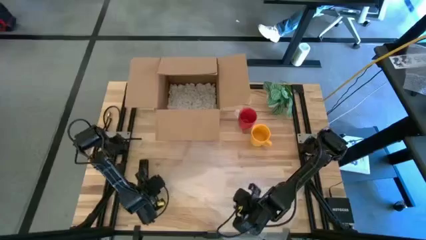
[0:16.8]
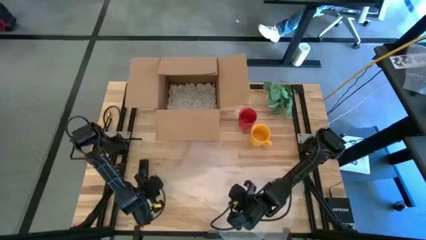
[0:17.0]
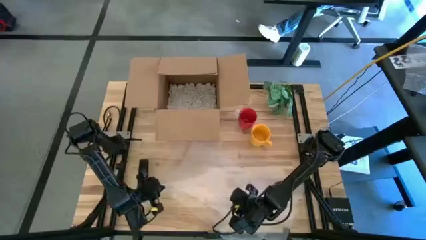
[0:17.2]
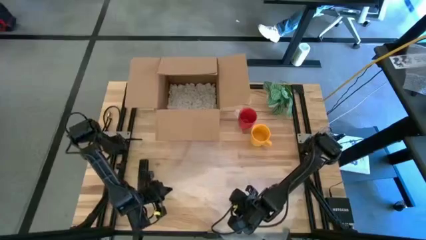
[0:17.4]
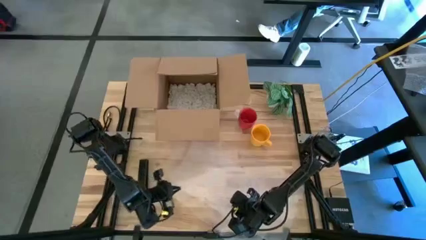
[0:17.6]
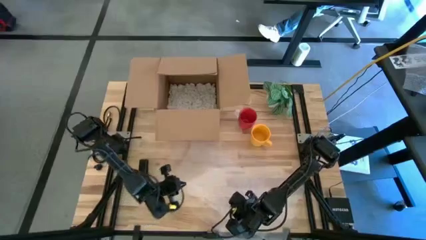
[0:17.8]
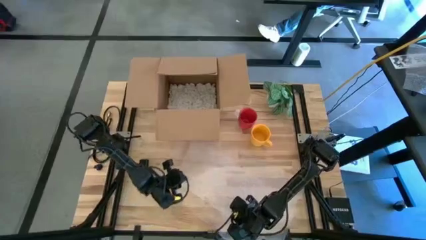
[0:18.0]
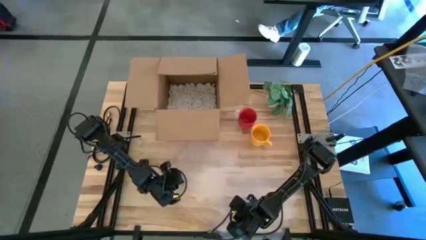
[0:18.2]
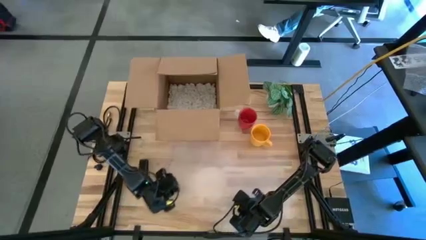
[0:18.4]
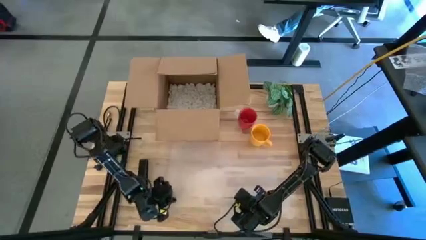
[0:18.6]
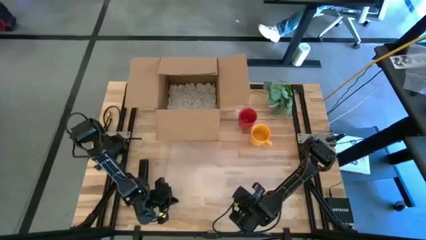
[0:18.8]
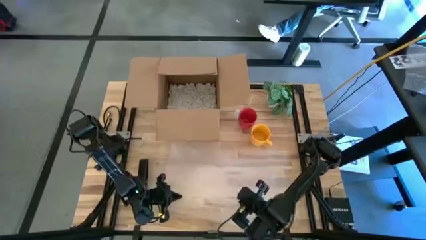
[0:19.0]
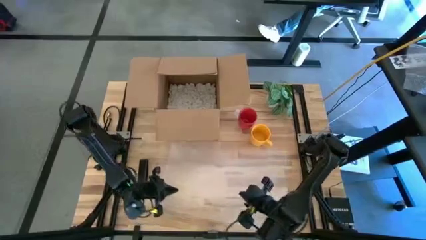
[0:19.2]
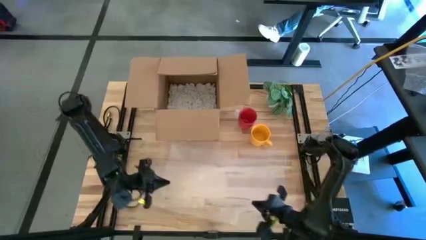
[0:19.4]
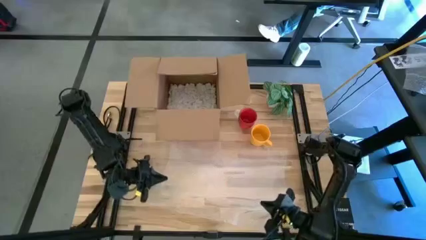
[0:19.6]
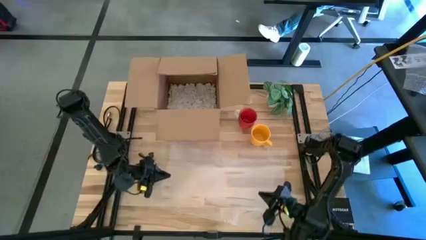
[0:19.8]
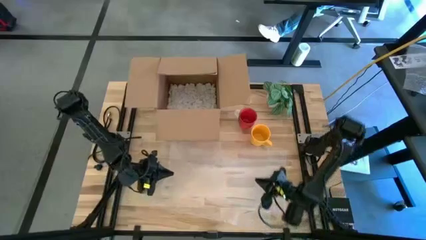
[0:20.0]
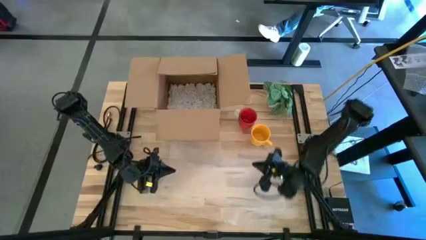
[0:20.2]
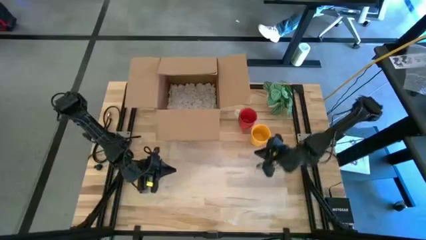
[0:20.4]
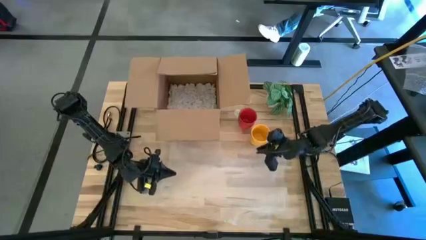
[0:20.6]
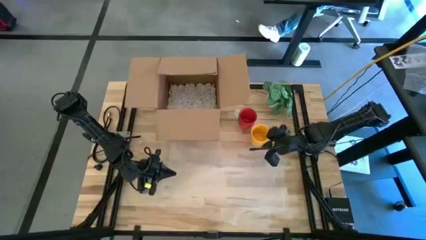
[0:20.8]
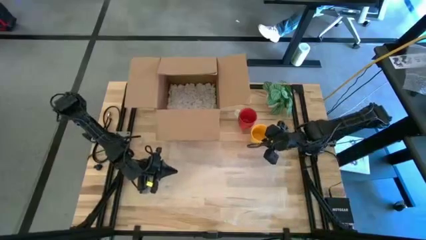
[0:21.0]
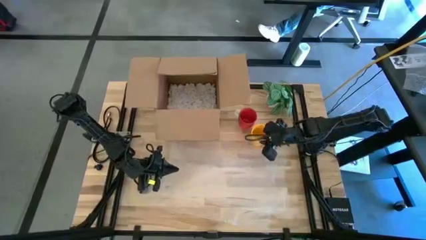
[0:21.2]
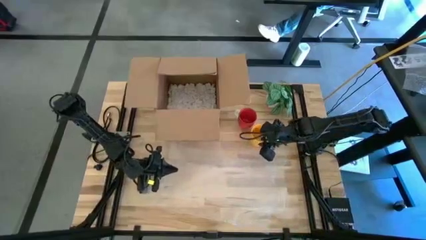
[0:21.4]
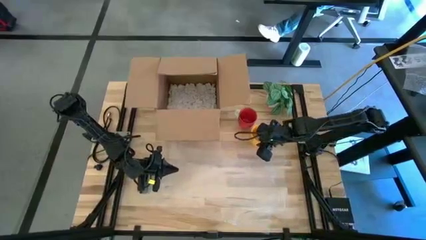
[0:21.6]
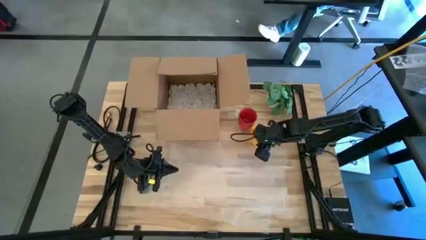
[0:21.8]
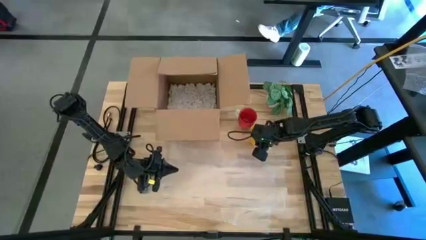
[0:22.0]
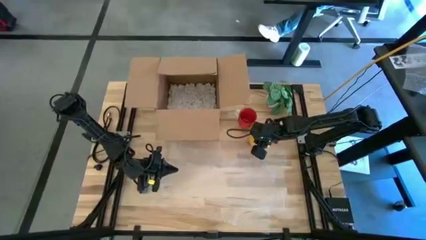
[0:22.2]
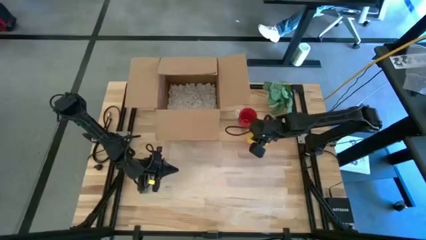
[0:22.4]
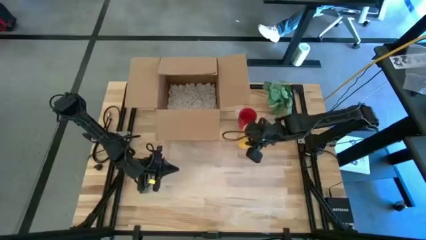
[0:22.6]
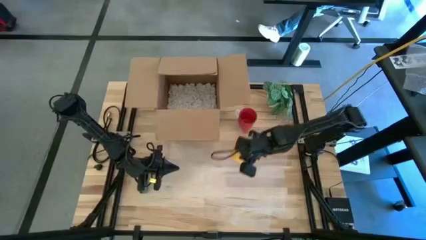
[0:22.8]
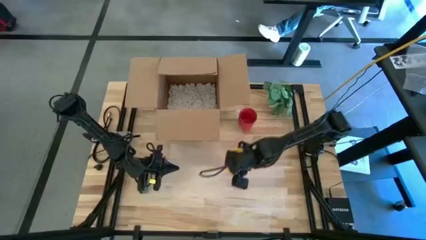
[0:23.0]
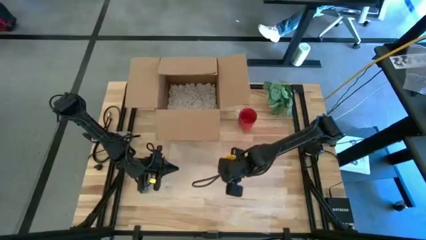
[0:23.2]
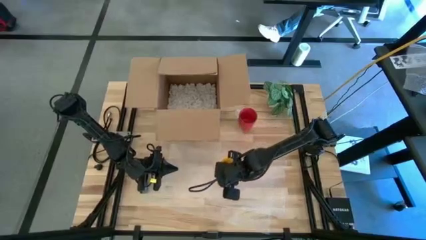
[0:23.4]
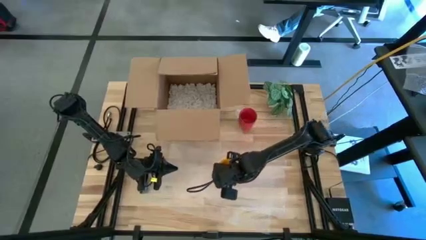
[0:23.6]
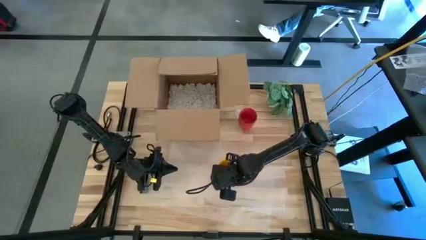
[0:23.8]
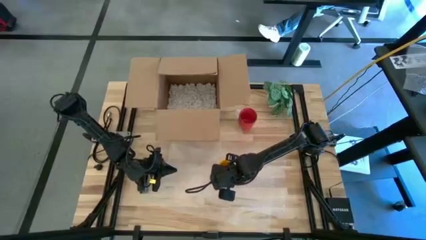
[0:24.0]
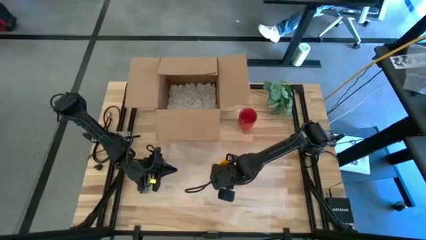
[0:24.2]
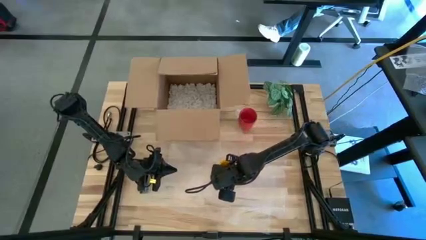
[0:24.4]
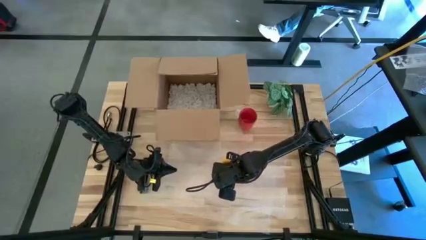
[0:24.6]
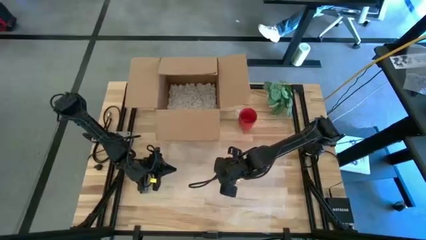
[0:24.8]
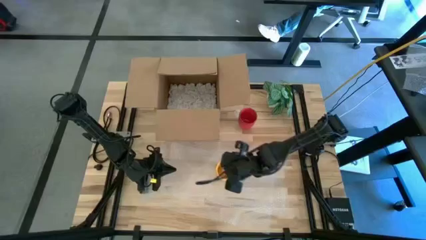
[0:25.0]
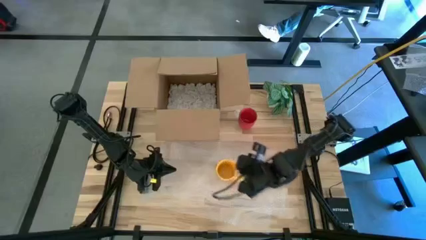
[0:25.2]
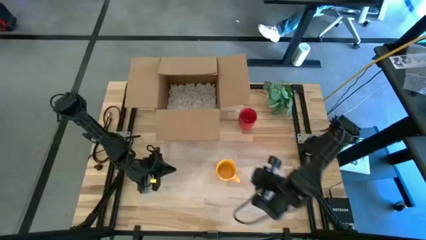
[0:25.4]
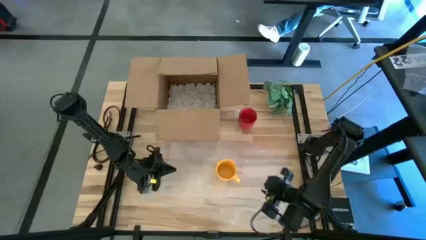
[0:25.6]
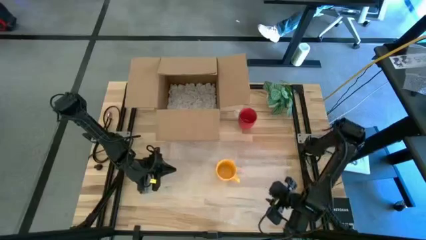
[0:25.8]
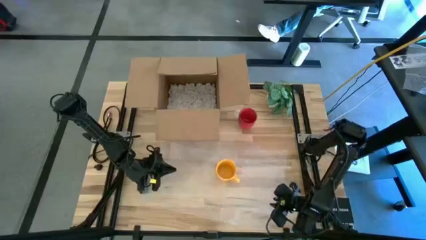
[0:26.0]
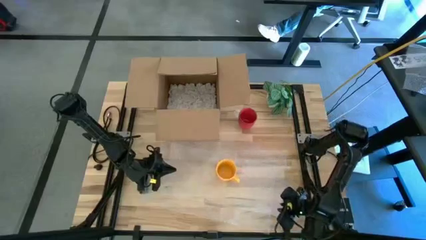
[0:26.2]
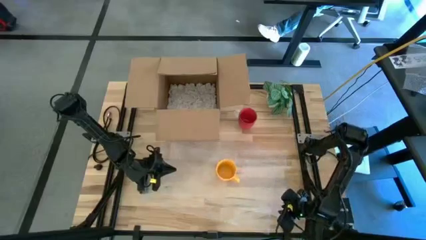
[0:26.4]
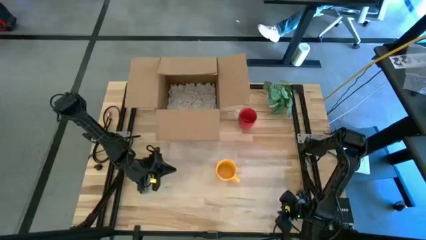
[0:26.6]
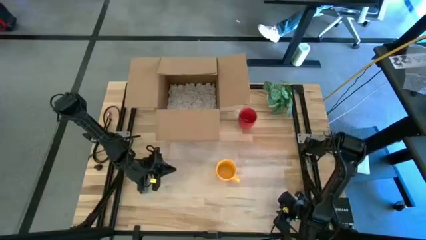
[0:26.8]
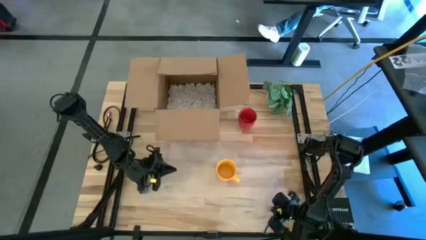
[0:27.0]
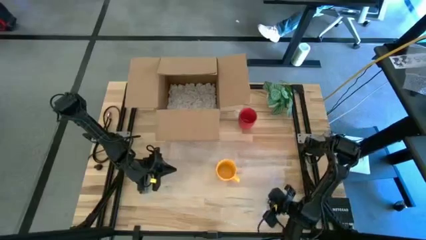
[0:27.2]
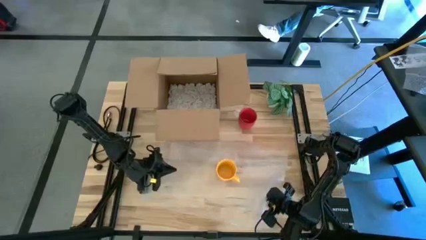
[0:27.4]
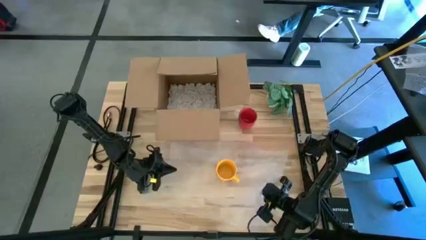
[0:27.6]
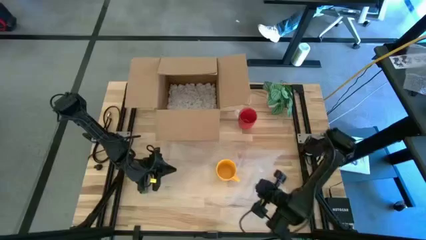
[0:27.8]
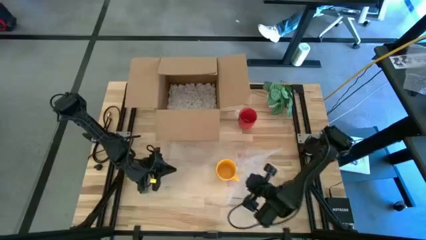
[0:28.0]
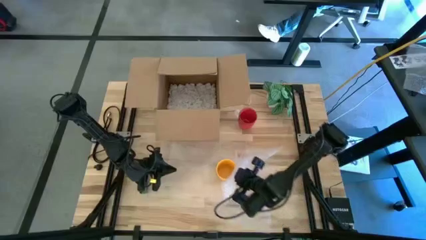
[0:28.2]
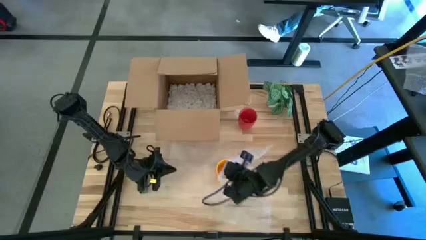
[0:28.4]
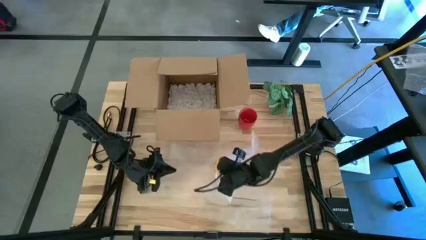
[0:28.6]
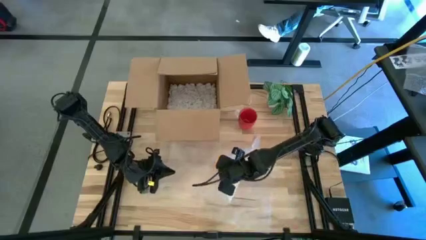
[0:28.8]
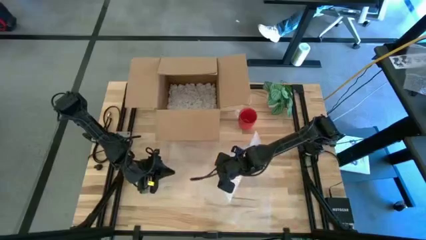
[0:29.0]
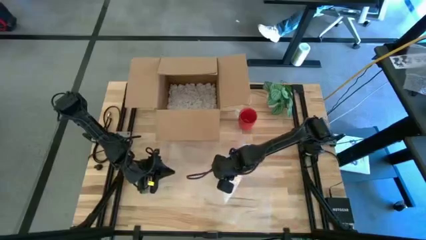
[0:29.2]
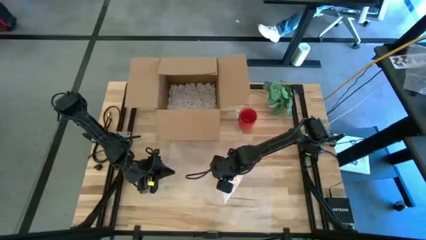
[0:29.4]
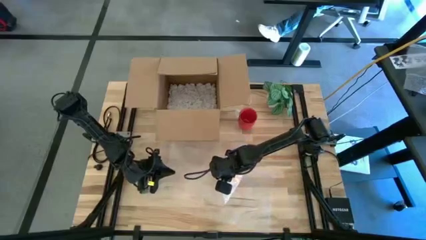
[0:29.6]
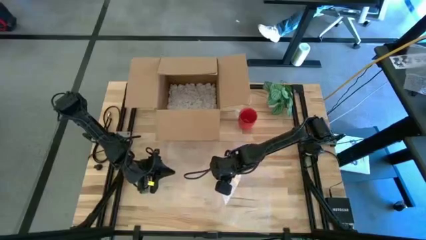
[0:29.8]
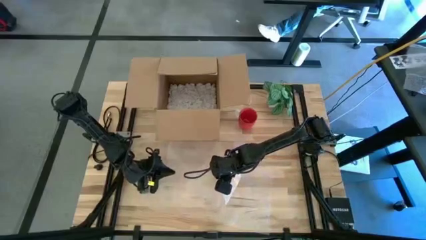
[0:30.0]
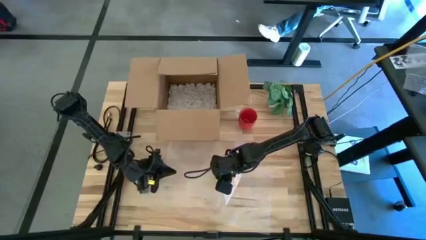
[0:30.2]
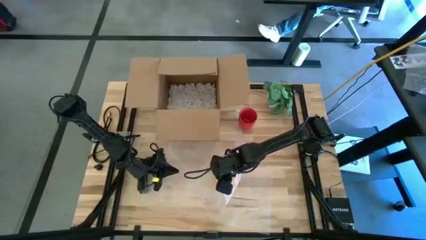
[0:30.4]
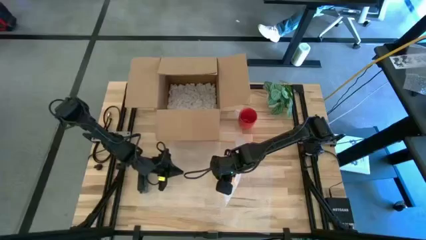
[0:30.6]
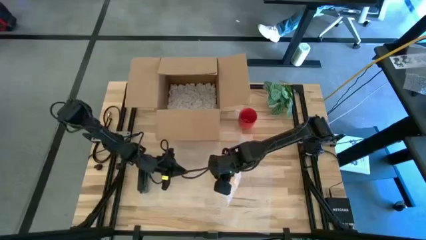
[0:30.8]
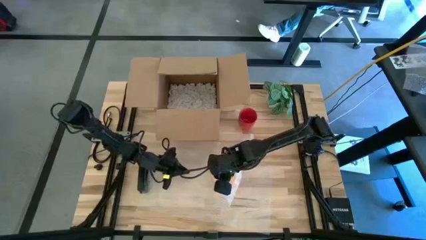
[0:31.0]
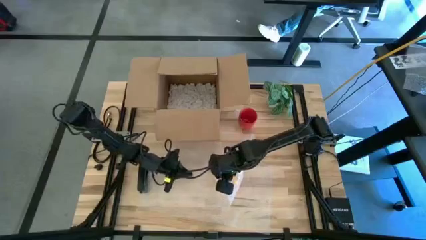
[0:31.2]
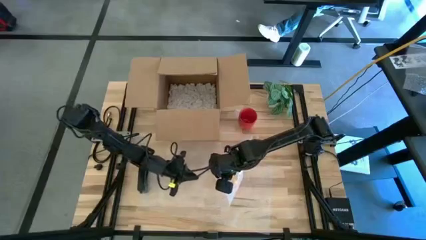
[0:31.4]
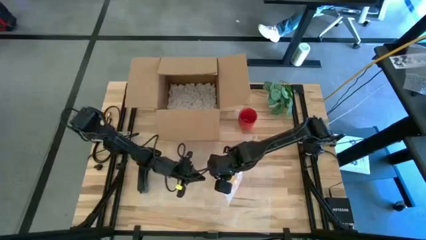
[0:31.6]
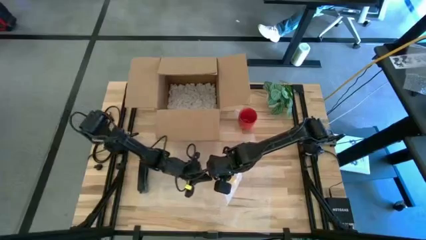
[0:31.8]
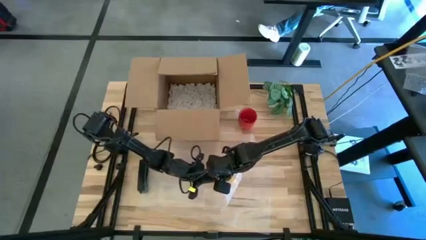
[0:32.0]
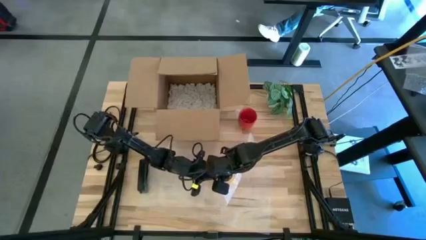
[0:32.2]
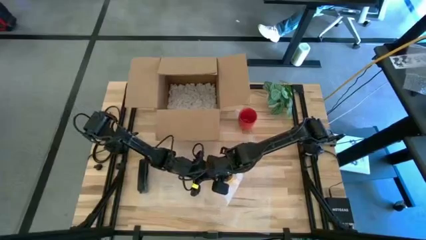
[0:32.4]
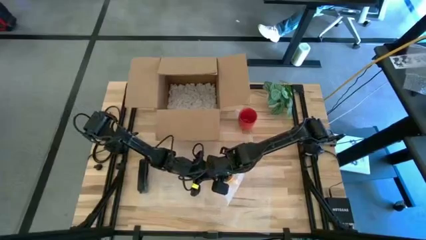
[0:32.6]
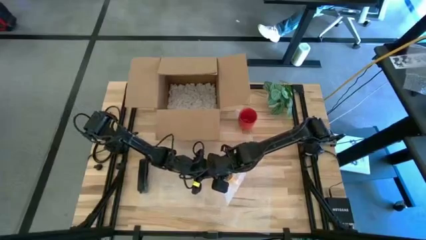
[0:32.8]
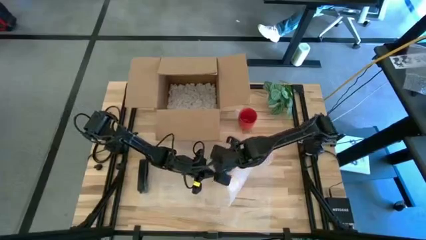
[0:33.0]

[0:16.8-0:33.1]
Task: wrap mug
Wrap the yellow mug with bubble wrap
